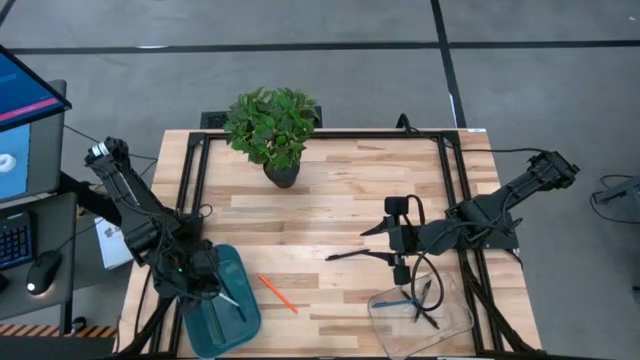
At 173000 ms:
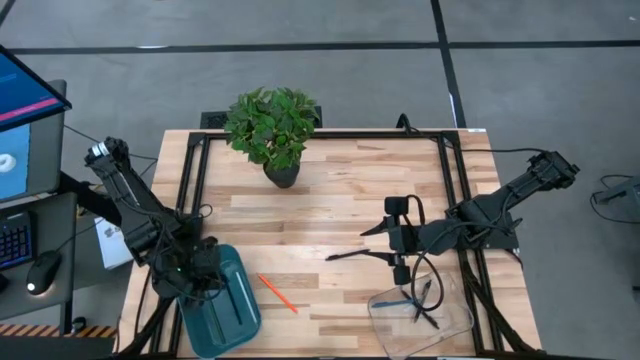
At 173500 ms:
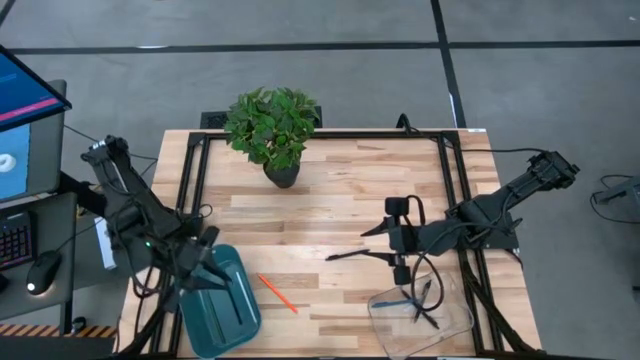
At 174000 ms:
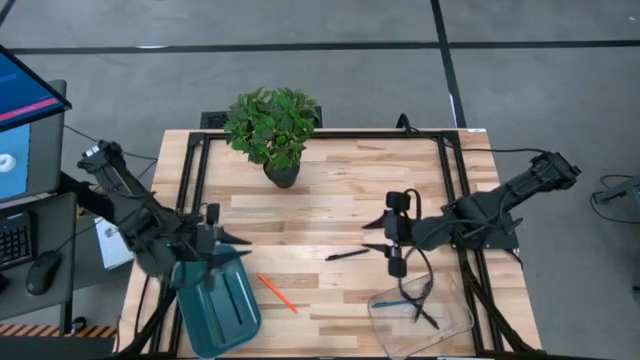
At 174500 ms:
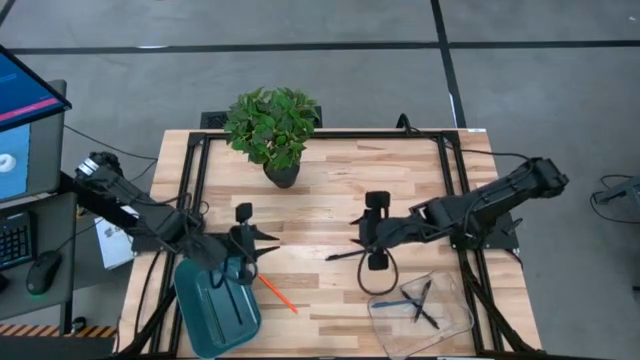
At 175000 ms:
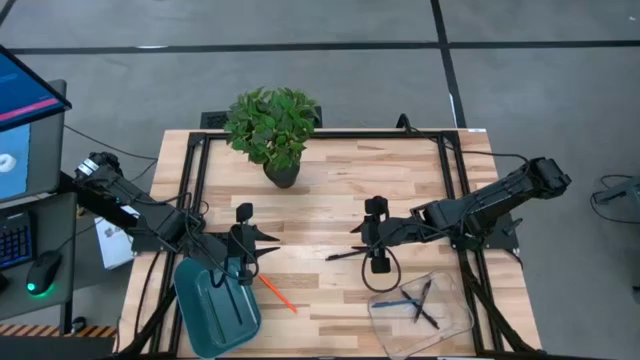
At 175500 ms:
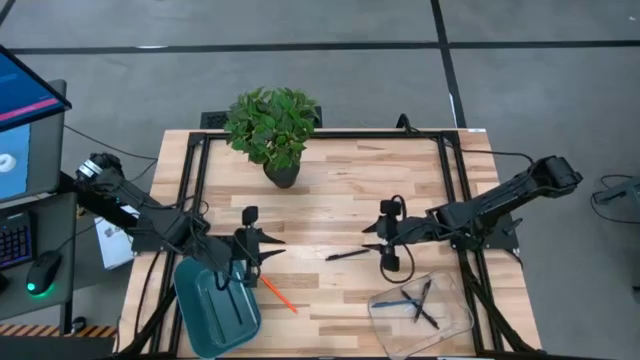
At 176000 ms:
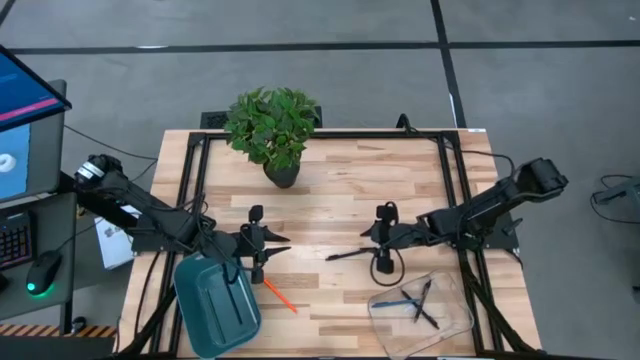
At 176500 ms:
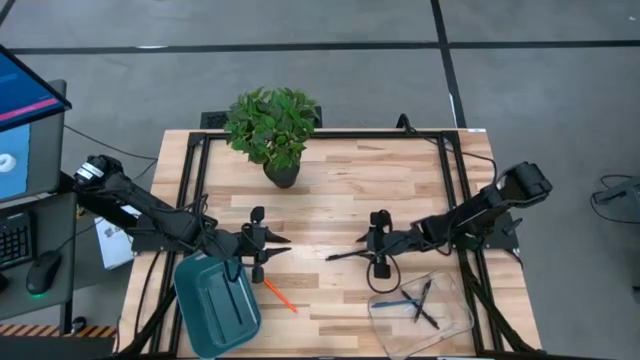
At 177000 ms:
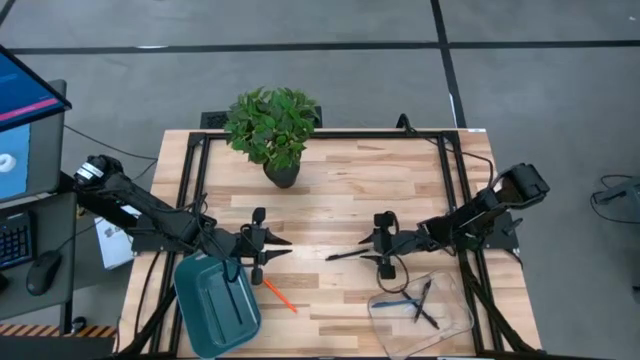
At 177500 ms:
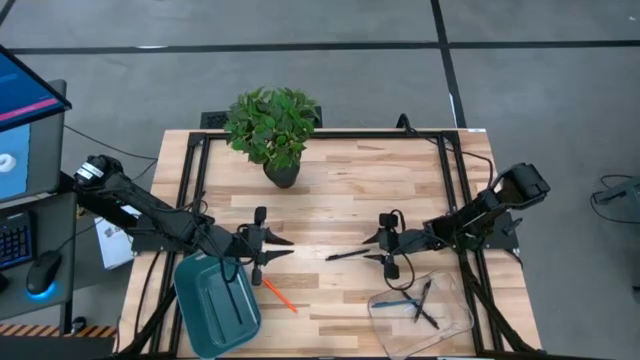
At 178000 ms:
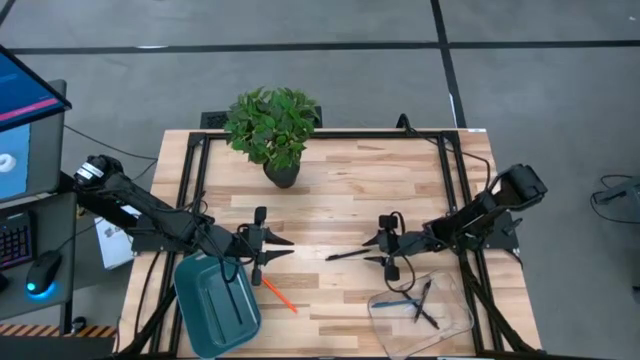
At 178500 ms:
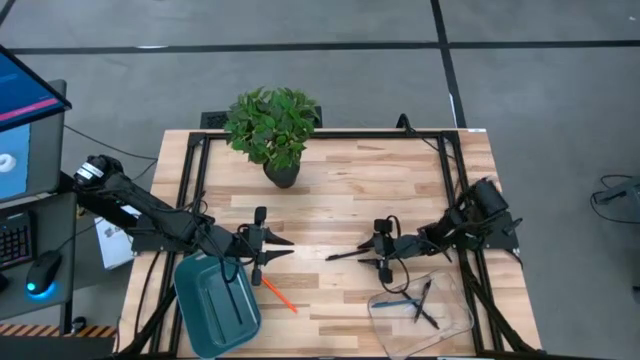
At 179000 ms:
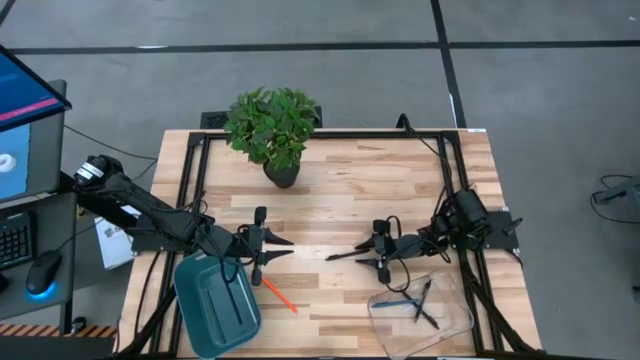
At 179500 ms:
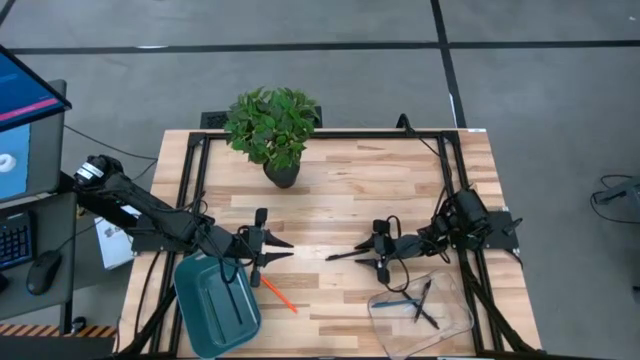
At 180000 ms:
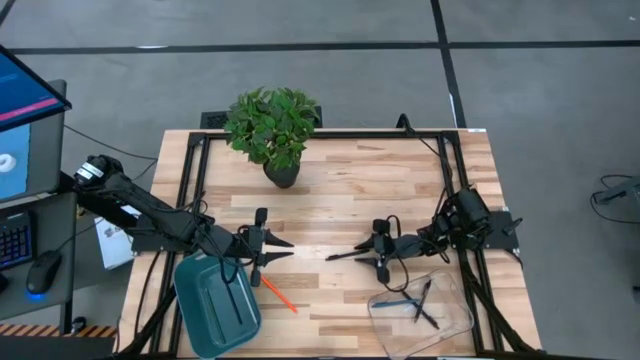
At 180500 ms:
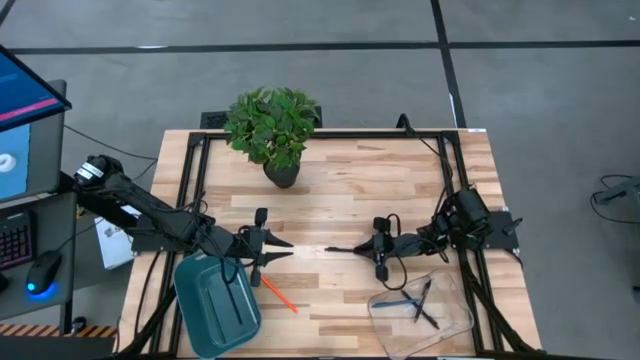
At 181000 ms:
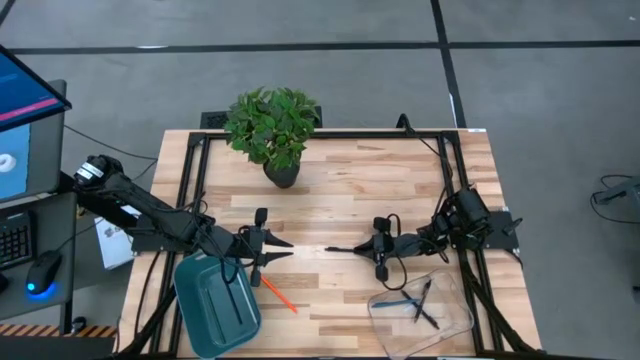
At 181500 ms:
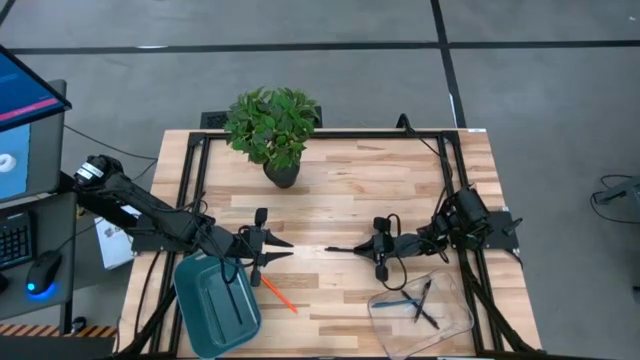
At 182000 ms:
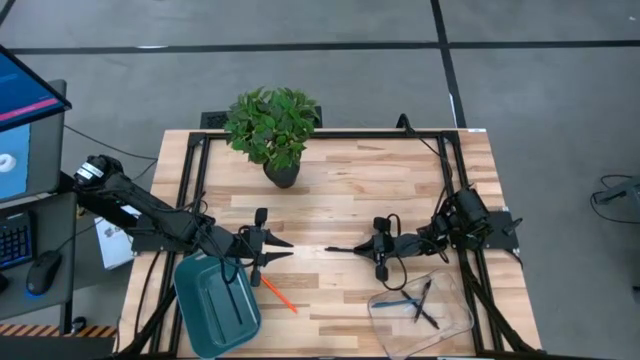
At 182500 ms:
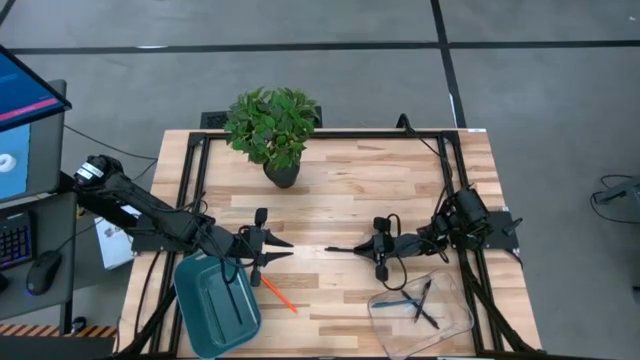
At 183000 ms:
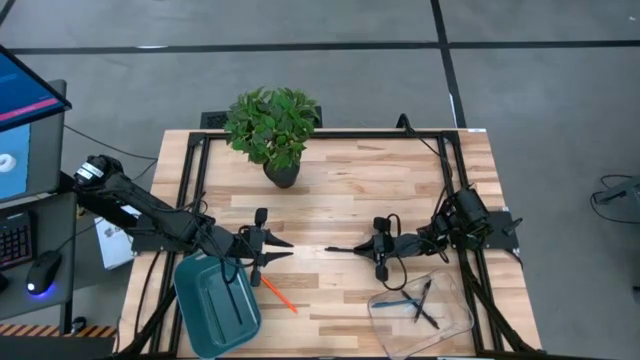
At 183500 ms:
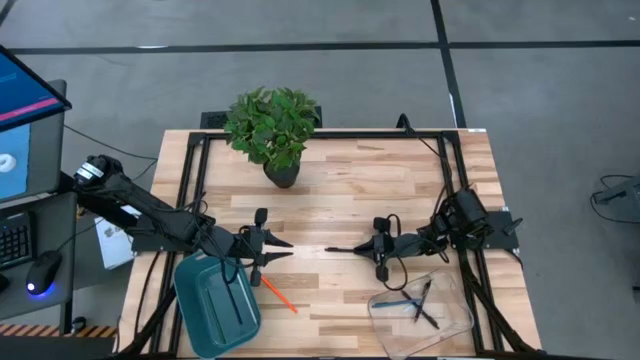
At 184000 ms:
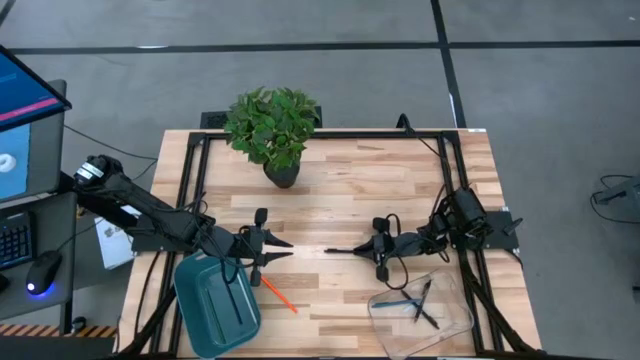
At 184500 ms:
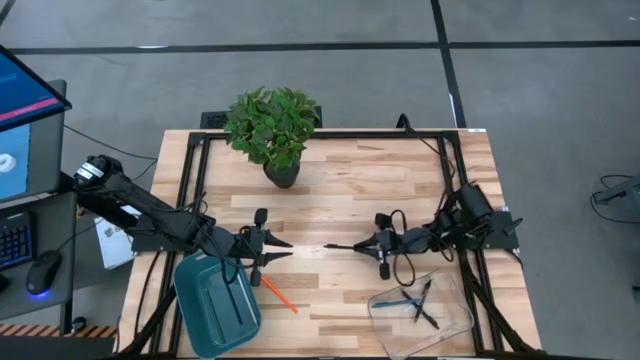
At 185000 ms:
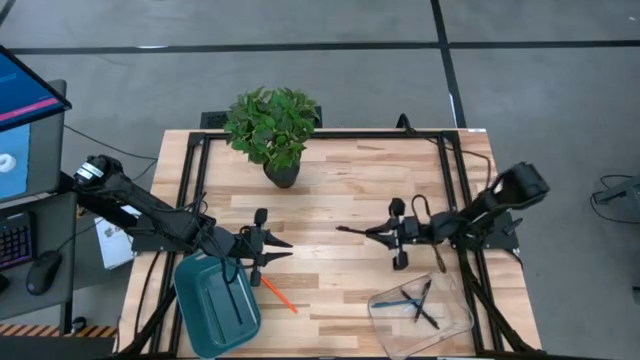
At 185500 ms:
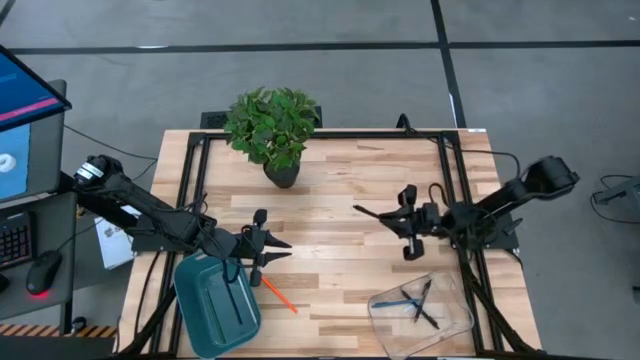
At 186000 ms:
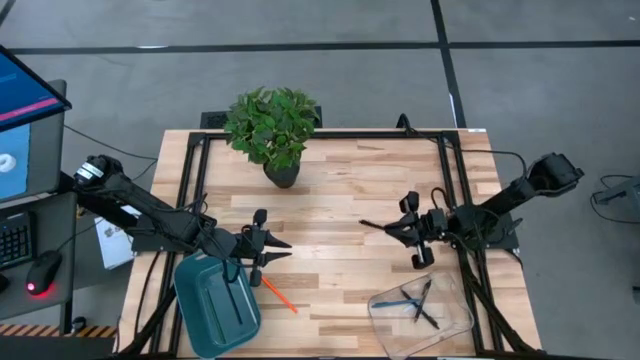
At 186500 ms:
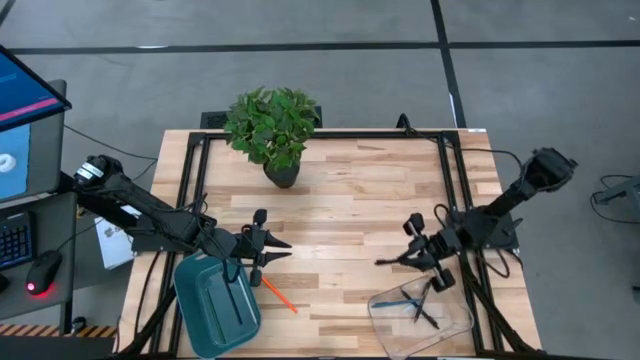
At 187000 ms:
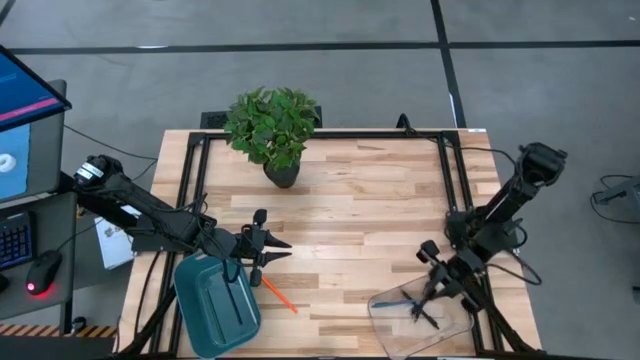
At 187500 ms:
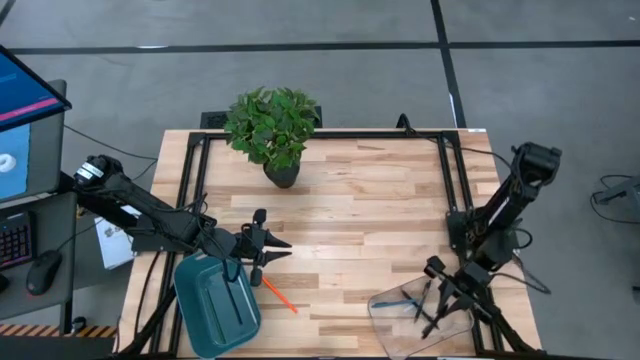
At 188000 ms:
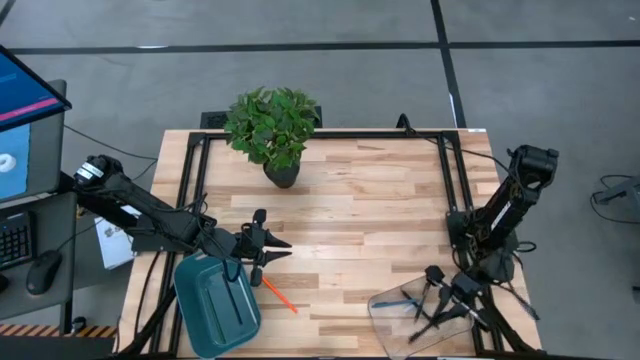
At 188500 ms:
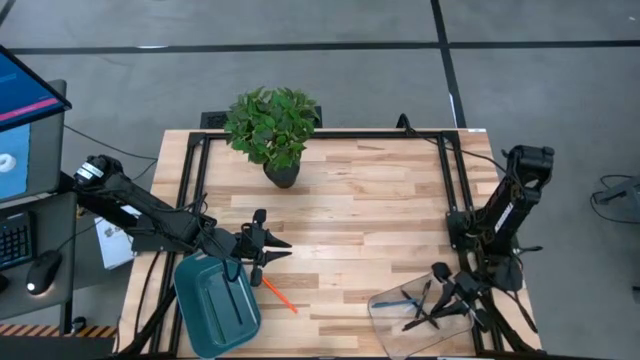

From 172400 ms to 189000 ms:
Task: Sort pens & pencils
Put the black pen into the transparent bin

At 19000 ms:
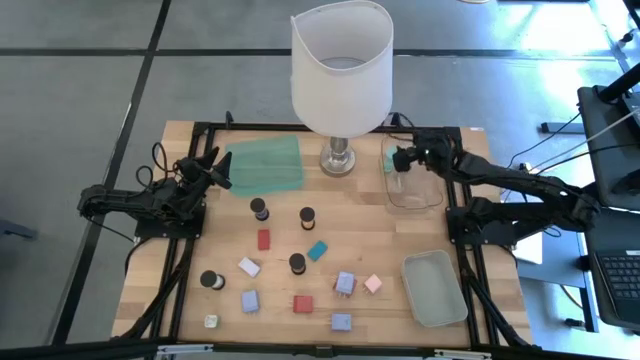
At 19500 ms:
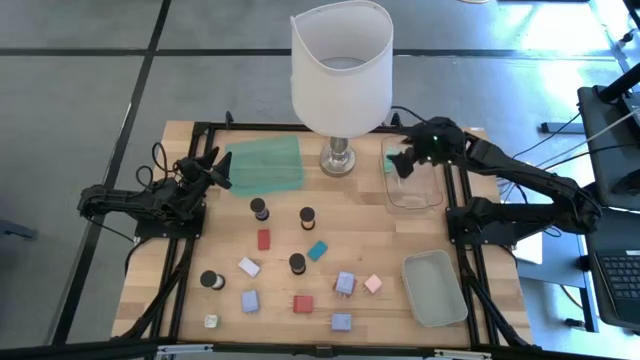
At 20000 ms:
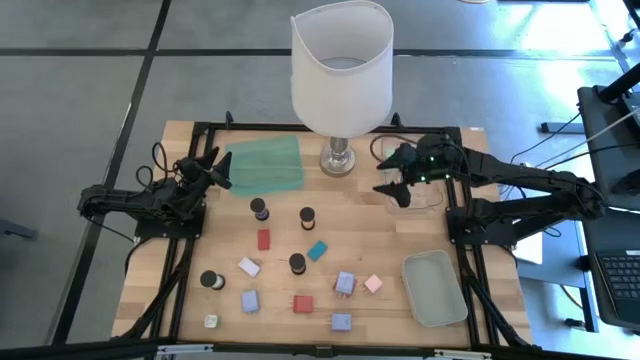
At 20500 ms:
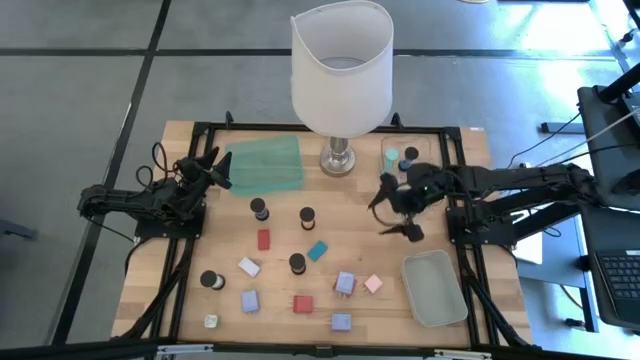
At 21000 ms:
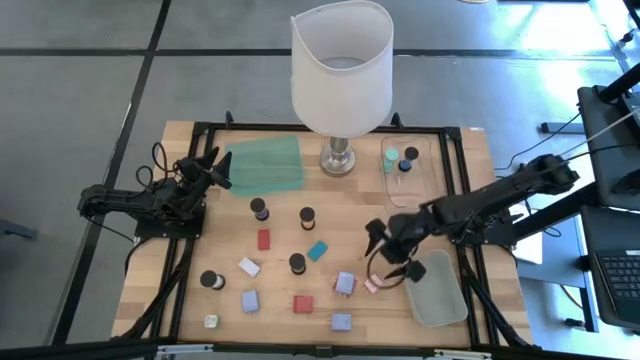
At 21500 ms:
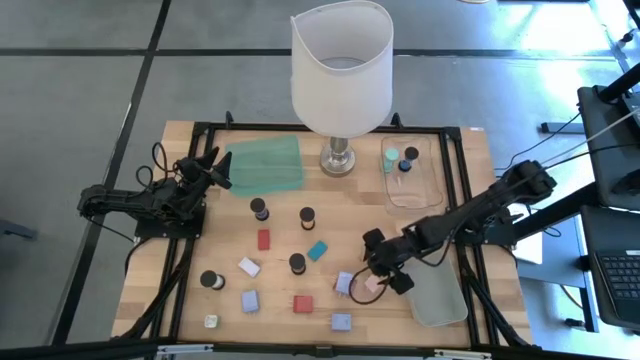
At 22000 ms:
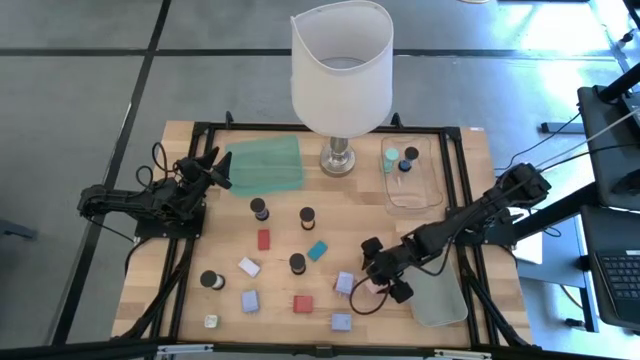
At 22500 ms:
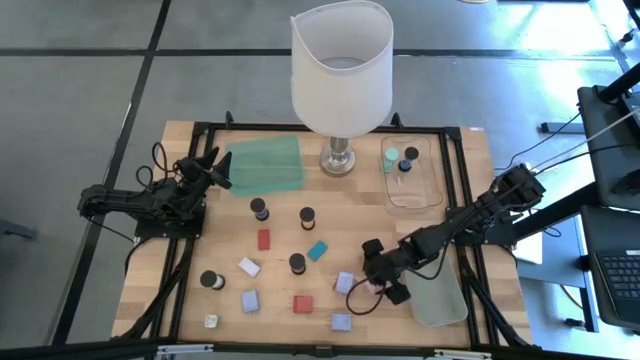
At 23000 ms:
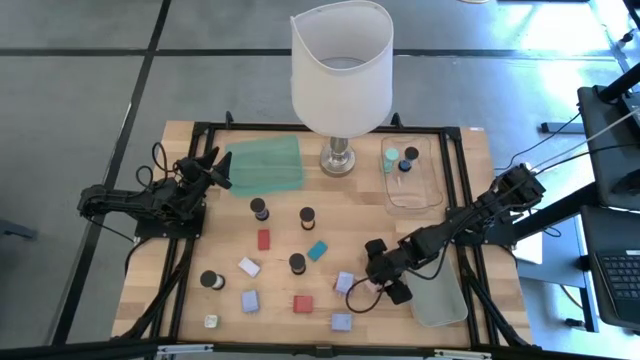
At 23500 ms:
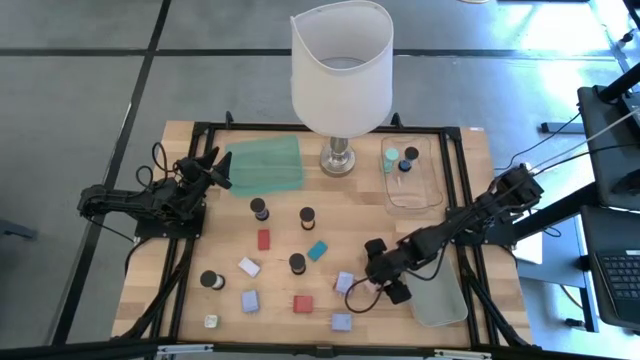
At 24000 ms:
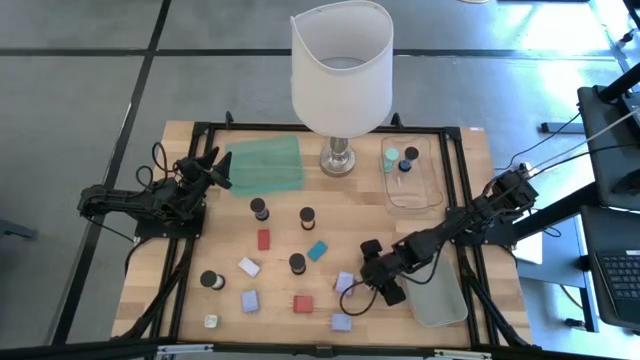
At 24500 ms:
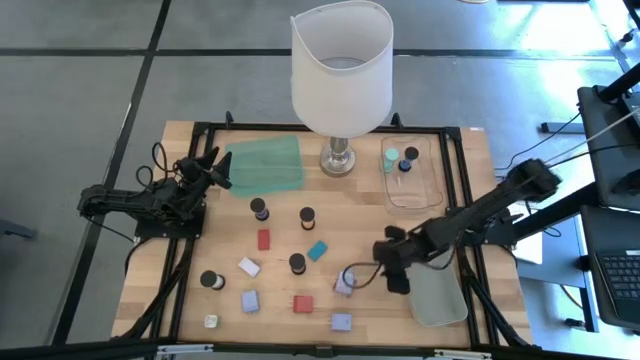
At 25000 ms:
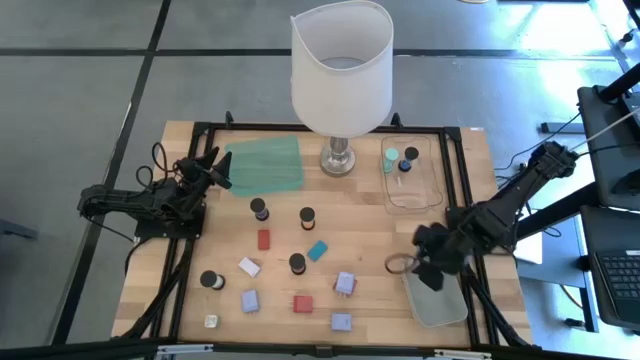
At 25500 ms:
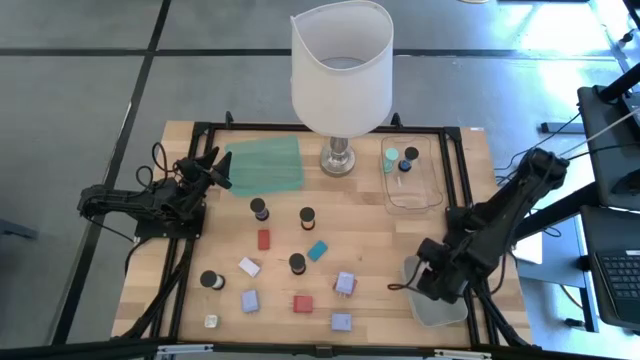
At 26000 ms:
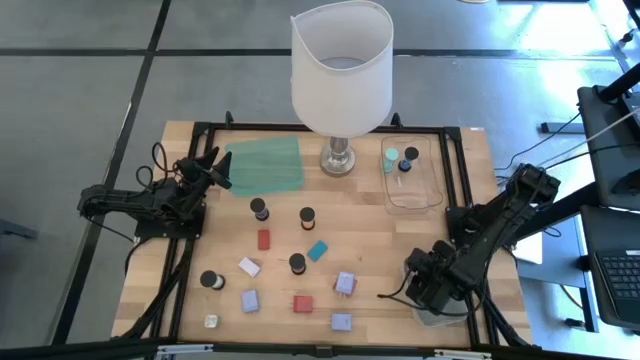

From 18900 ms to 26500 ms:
Task: Pick & Place Office items
Put the pink charger adapter into the gray bin
